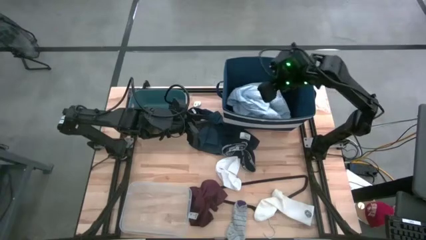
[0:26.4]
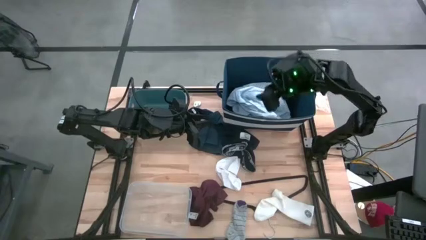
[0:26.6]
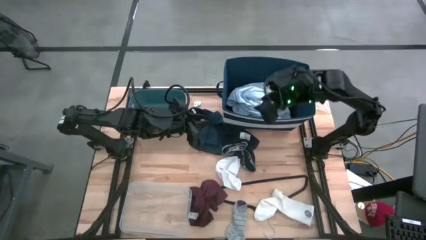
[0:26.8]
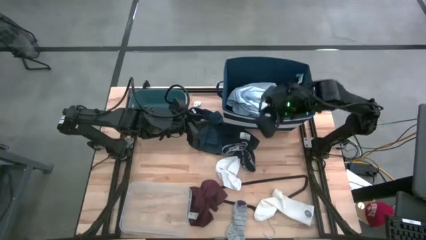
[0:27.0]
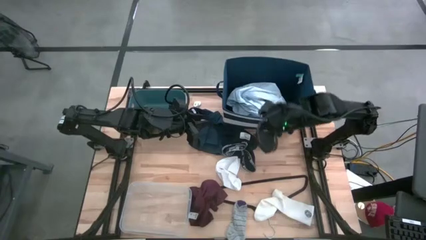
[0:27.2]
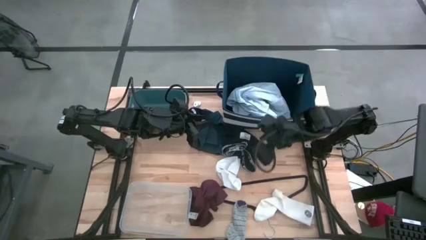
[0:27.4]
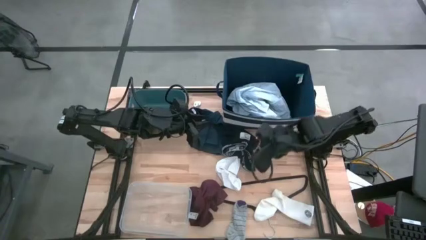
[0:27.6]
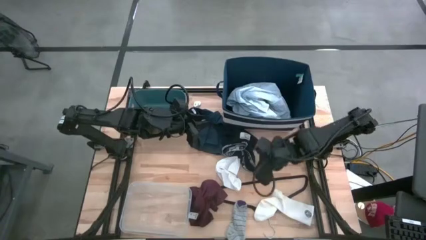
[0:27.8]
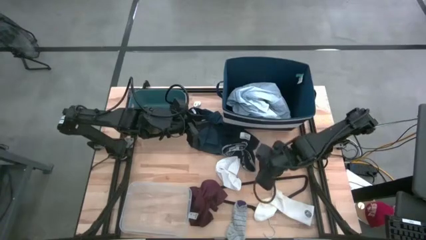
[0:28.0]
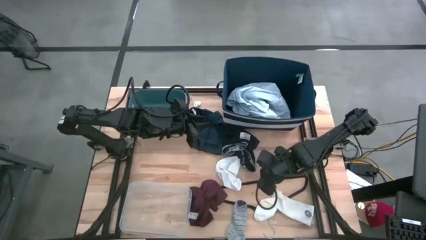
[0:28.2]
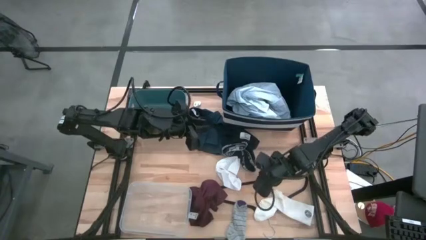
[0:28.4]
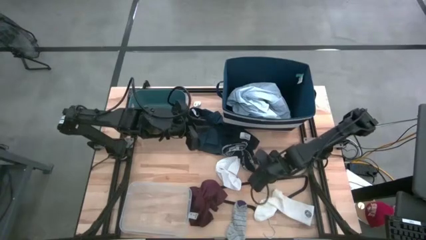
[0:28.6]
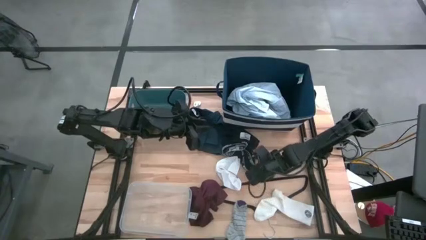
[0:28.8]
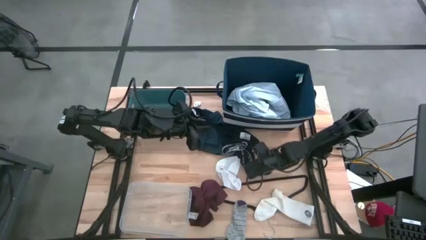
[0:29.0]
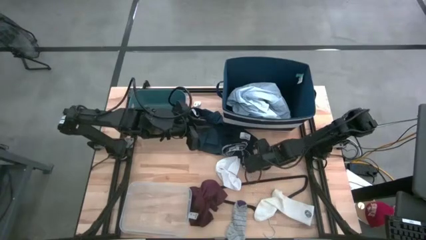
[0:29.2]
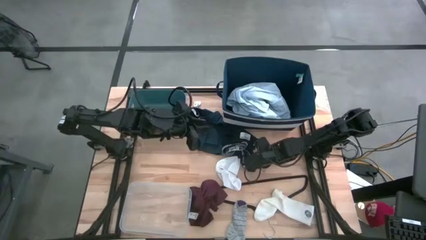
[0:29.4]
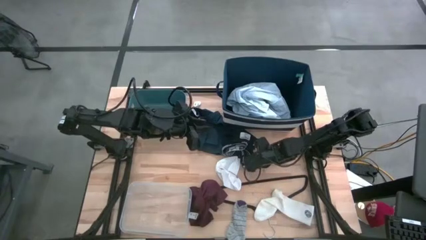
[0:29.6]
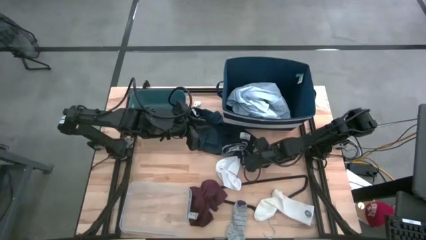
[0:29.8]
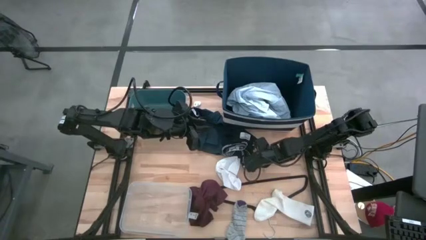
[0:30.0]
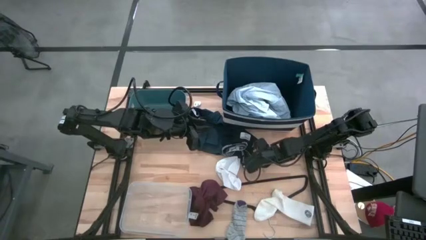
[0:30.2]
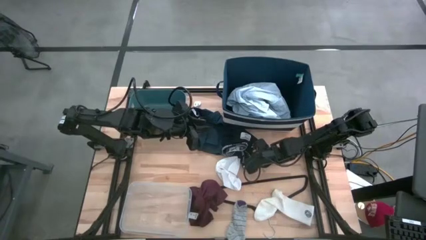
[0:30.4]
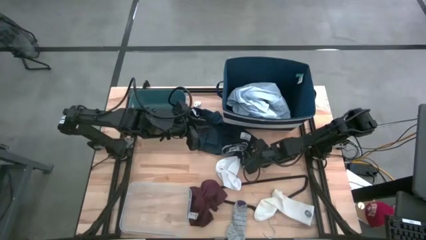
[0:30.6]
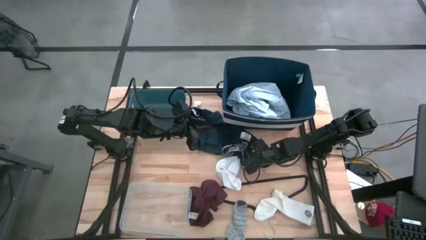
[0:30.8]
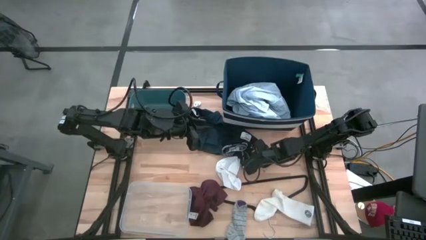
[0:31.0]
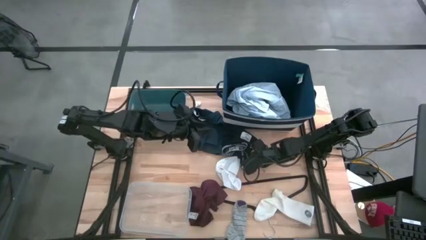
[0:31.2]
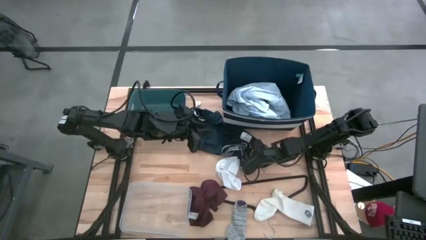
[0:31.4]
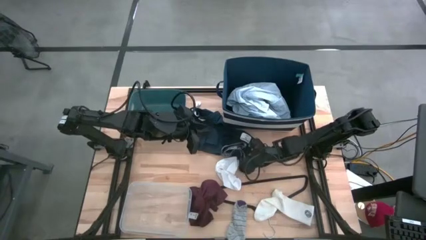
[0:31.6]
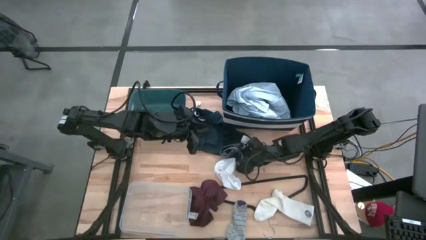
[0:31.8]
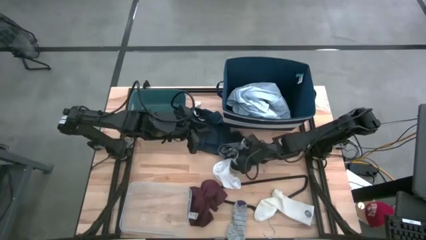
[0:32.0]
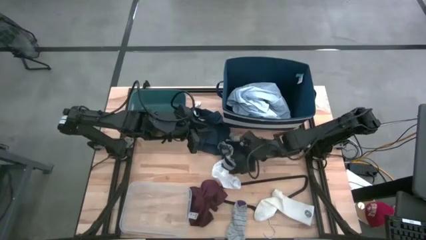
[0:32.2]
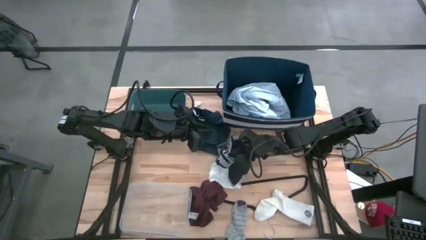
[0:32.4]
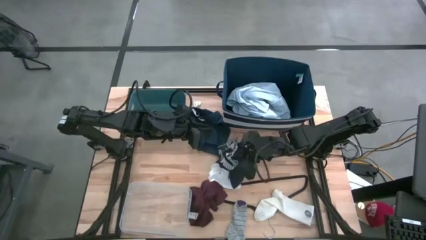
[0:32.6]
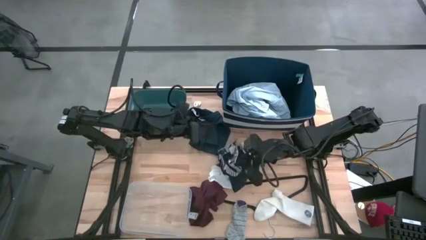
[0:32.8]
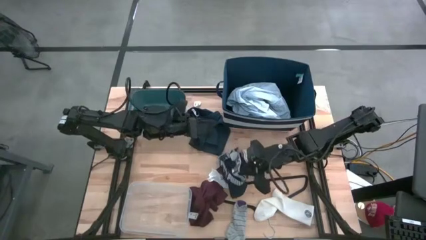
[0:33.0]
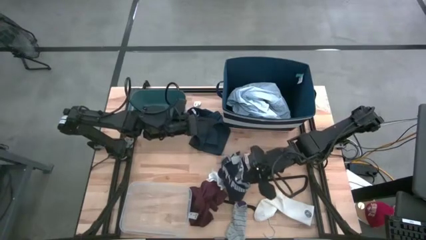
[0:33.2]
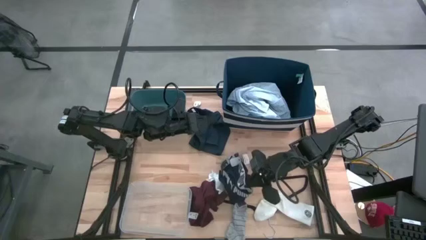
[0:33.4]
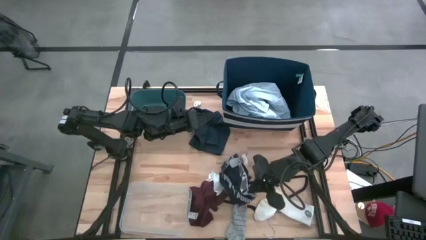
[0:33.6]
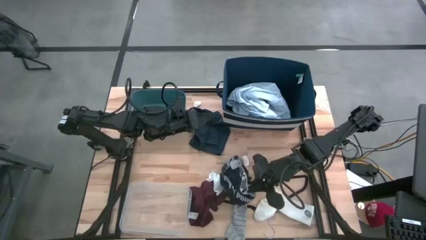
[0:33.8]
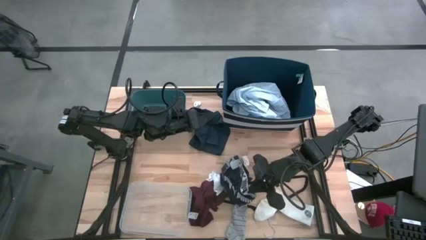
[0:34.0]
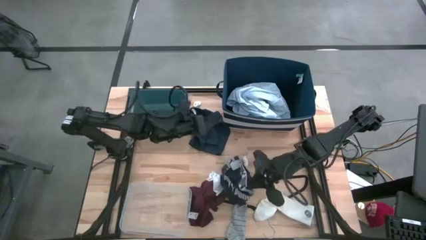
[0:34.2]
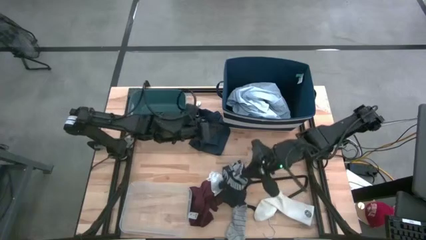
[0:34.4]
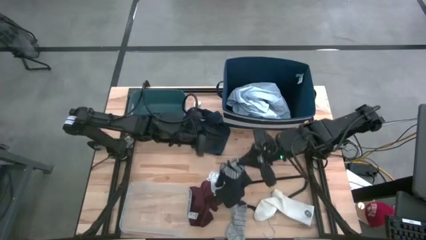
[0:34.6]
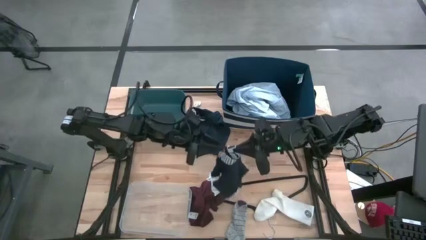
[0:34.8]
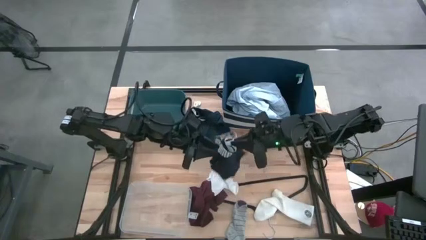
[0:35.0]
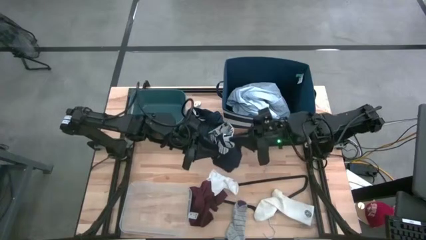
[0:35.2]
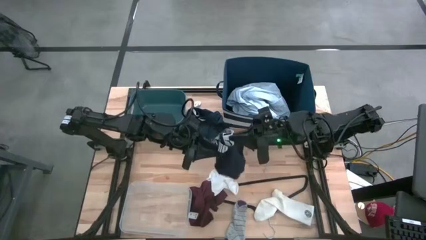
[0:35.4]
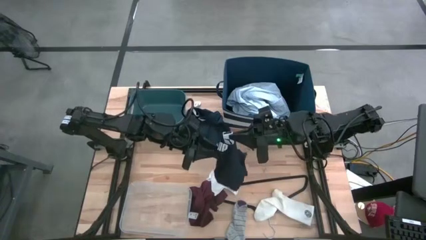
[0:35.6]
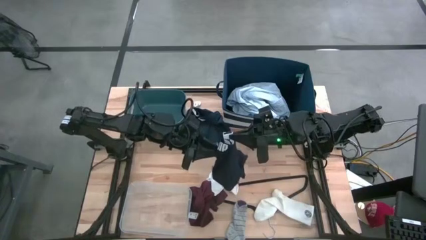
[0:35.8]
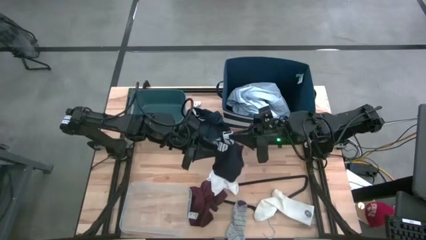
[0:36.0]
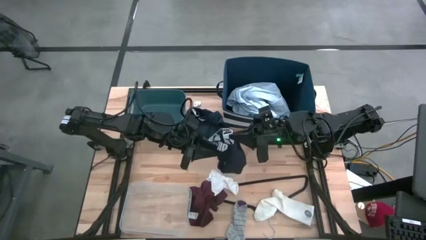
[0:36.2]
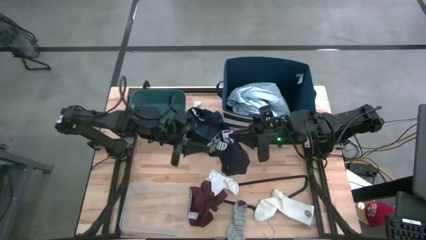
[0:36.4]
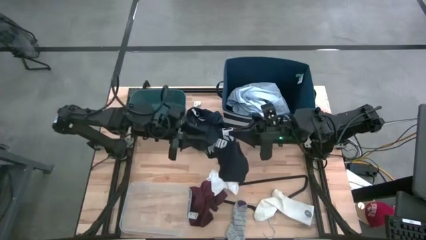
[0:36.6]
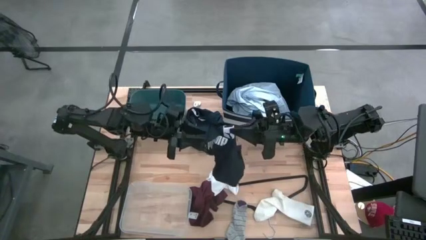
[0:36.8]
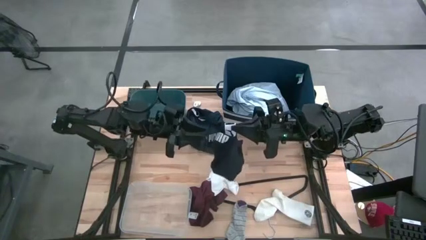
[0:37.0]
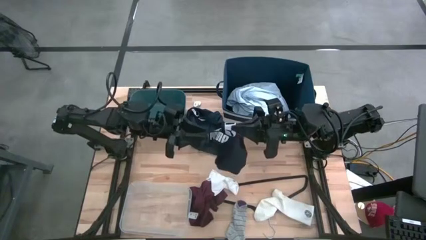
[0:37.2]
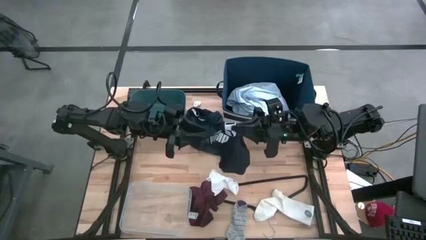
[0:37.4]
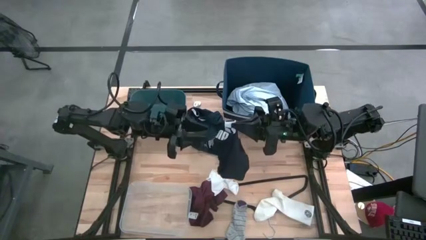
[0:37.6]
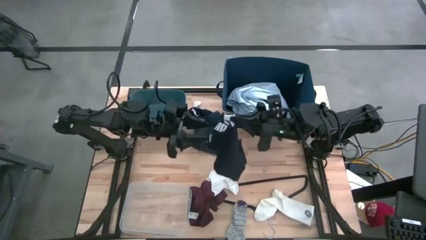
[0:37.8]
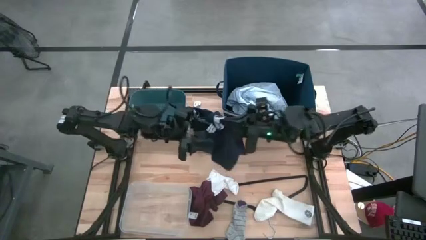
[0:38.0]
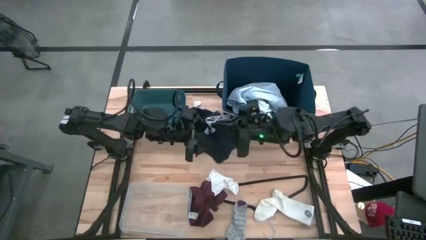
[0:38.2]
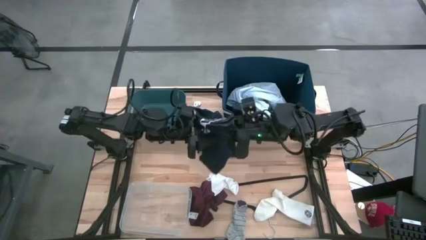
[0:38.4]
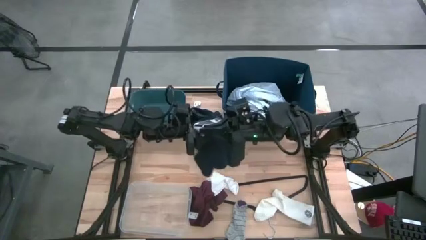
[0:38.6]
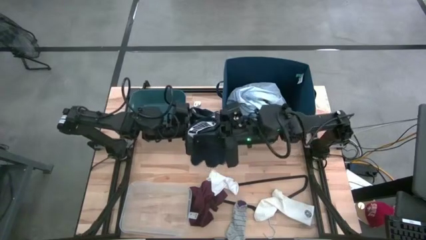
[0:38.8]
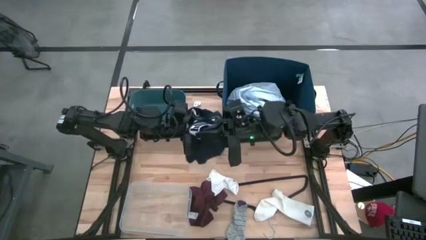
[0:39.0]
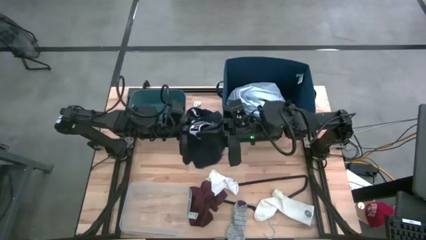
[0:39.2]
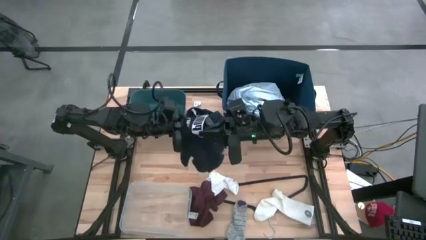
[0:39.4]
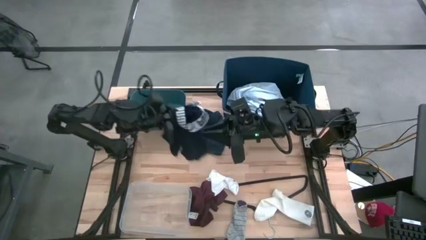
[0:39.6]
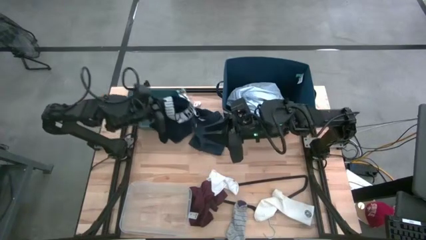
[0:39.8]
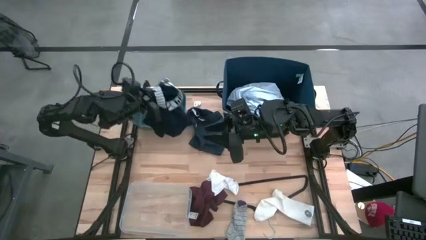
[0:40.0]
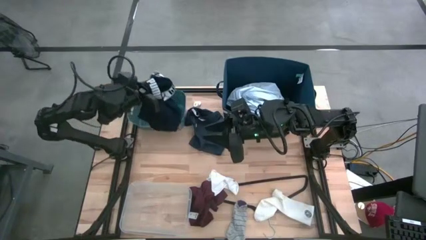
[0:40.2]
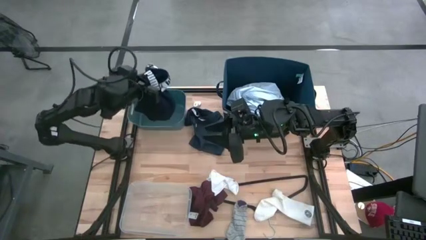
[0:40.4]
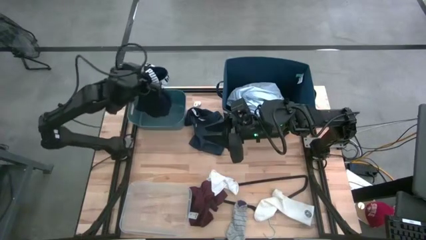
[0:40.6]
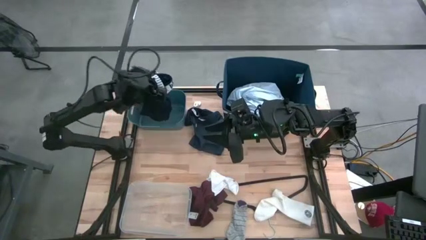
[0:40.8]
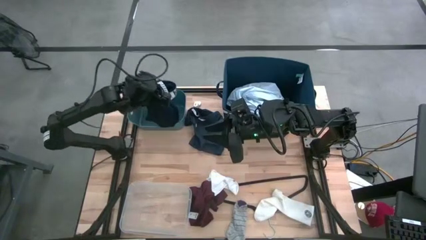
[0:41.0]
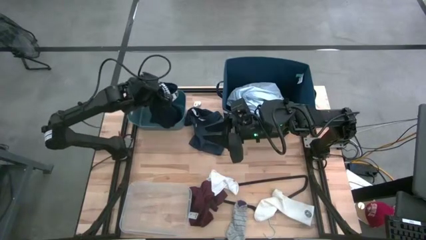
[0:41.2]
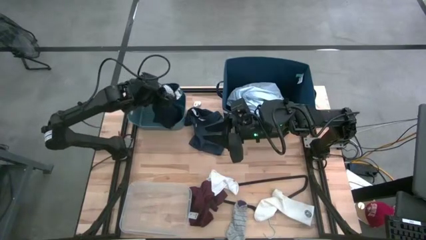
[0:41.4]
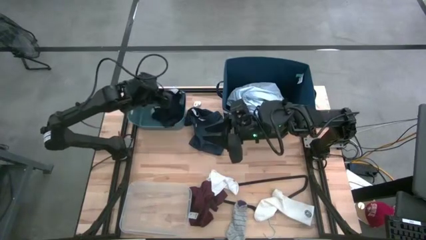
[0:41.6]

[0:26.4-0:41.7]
Task: Pick & Place Cloths
Put the dark blue boxers into the green bin
